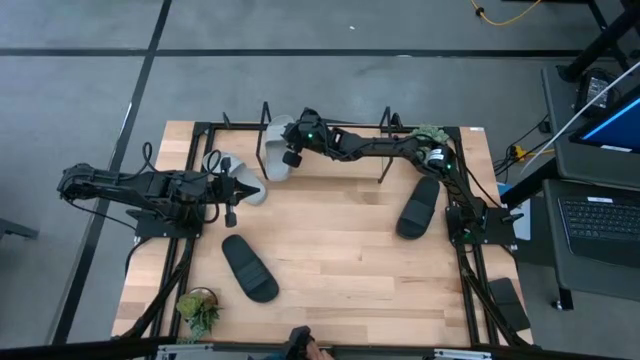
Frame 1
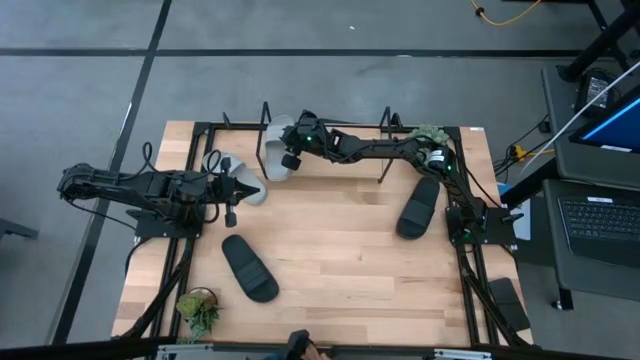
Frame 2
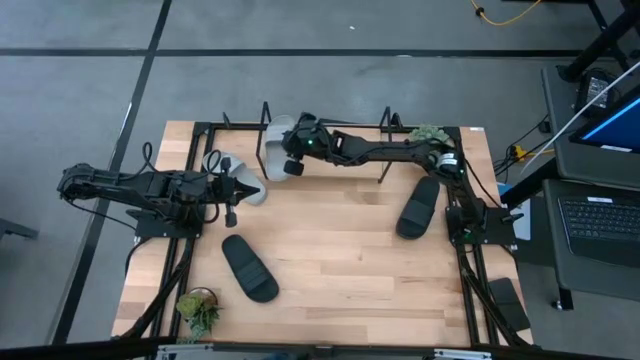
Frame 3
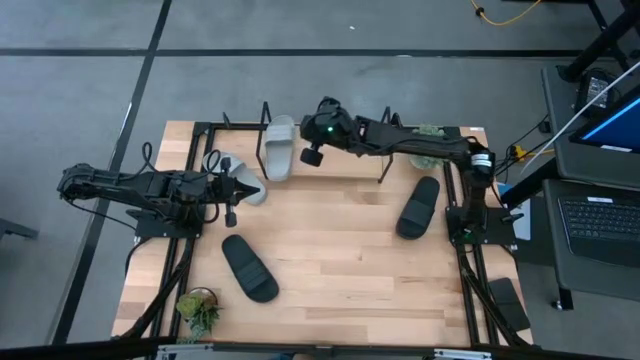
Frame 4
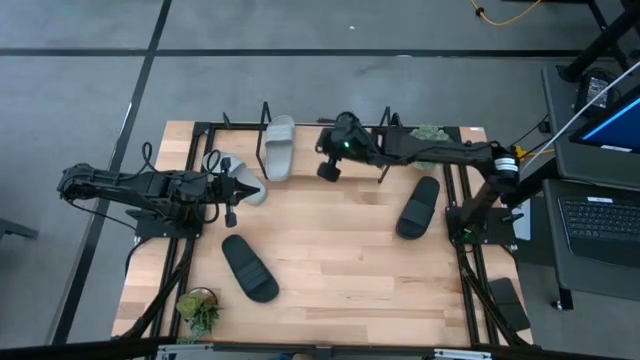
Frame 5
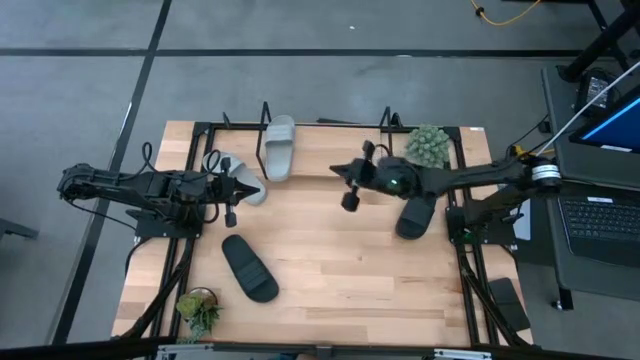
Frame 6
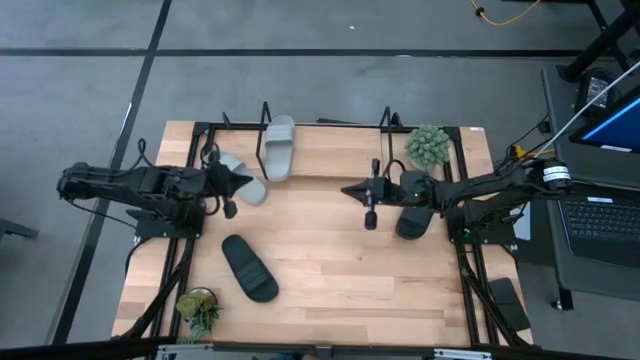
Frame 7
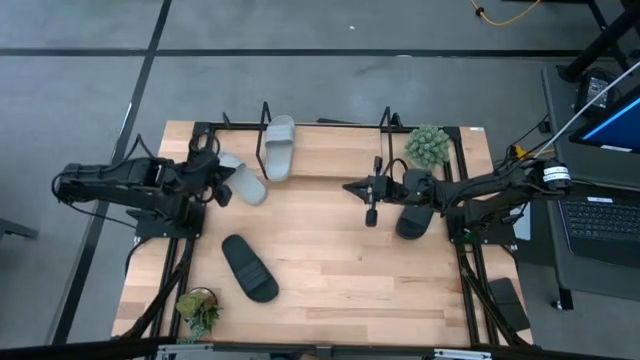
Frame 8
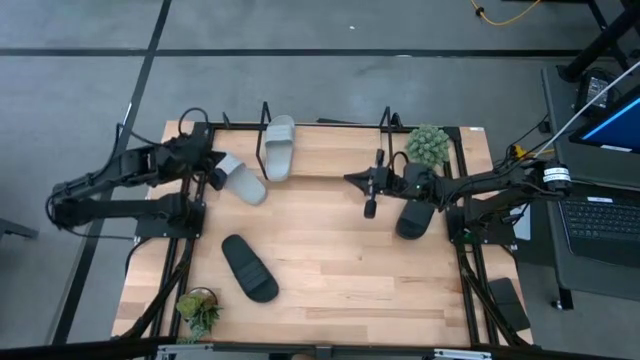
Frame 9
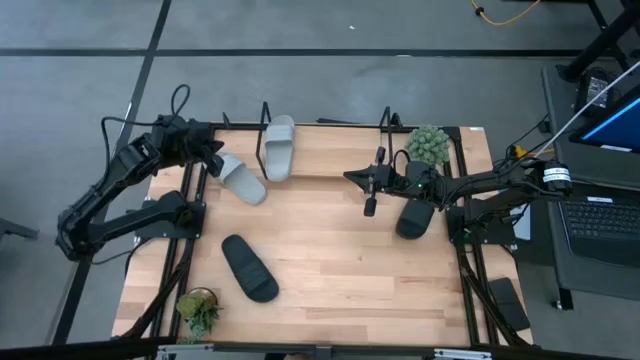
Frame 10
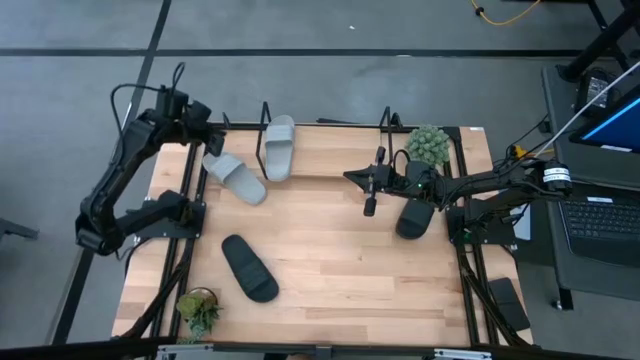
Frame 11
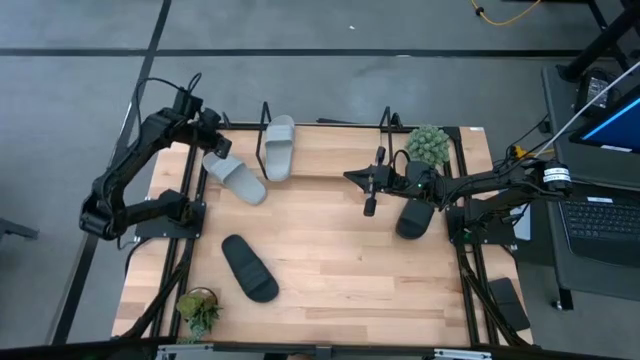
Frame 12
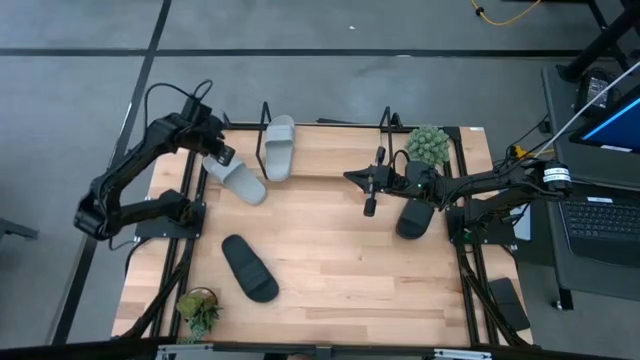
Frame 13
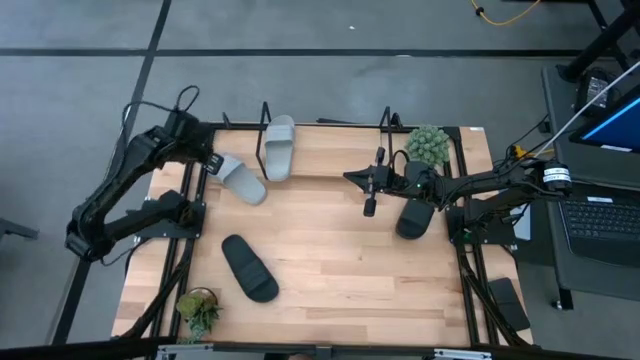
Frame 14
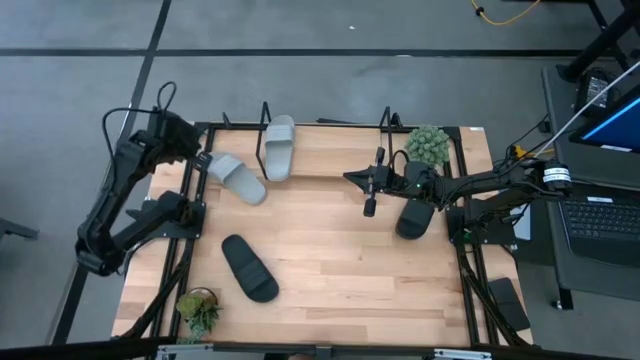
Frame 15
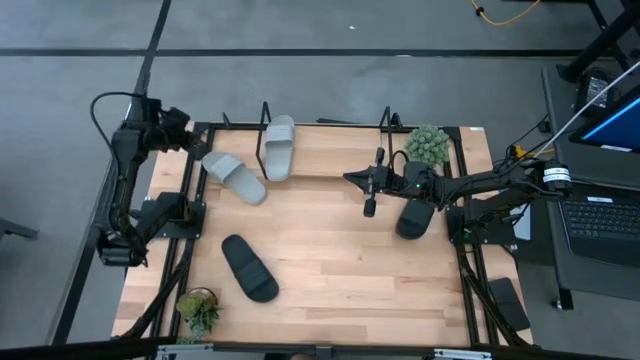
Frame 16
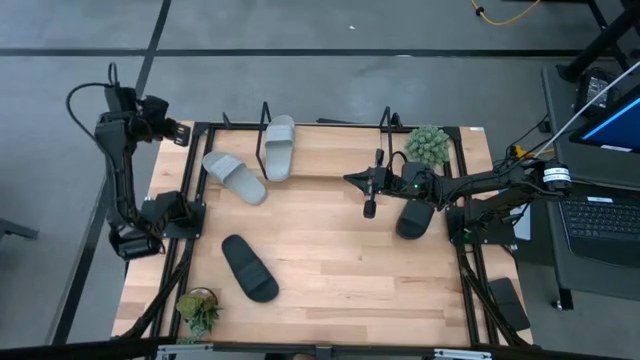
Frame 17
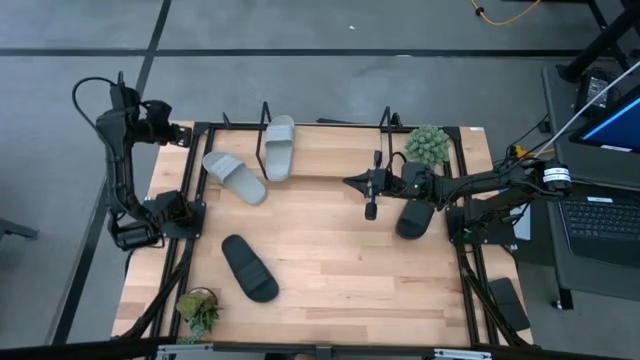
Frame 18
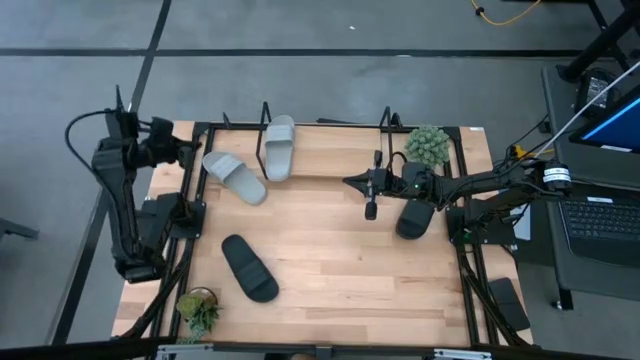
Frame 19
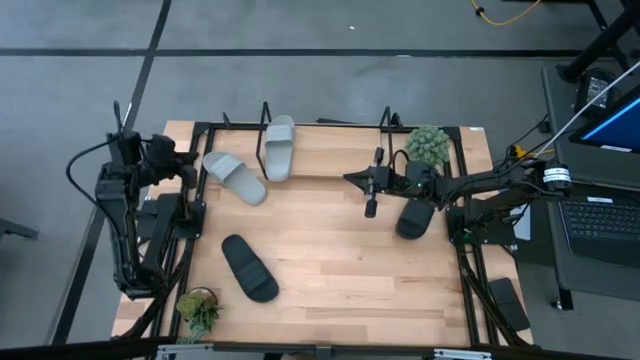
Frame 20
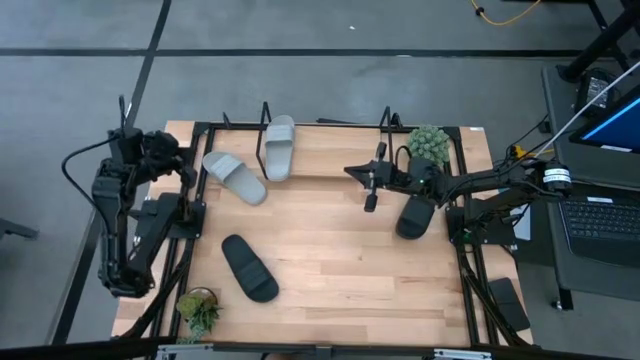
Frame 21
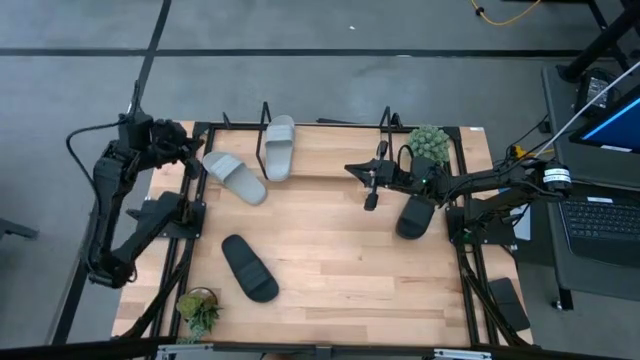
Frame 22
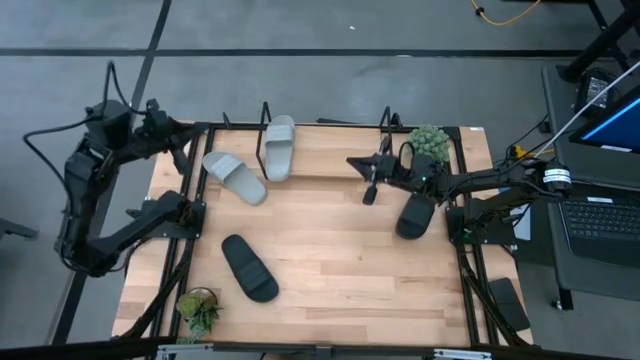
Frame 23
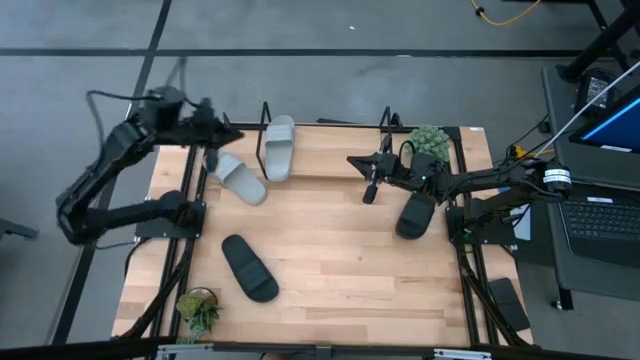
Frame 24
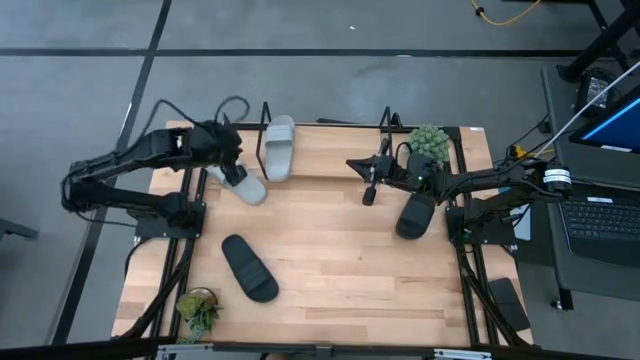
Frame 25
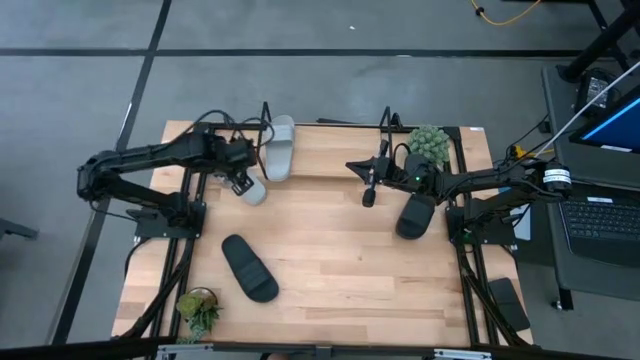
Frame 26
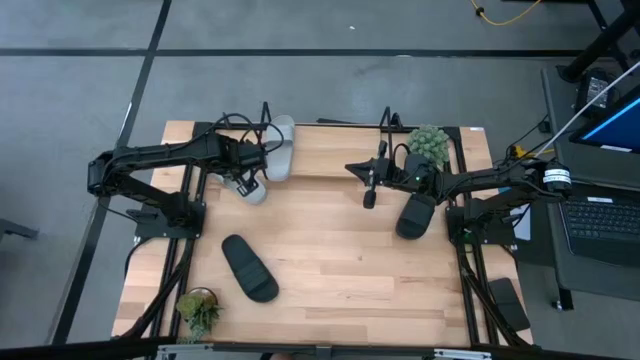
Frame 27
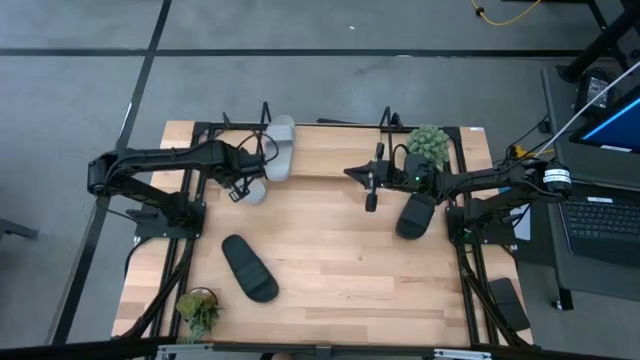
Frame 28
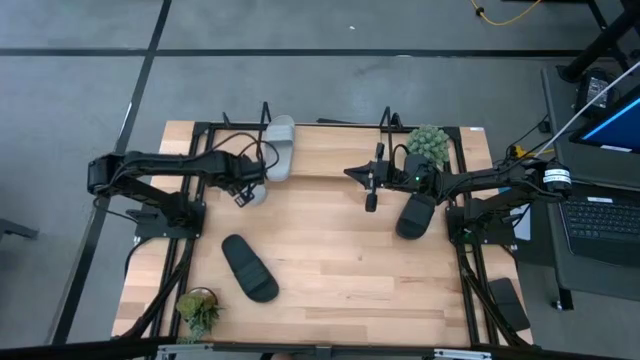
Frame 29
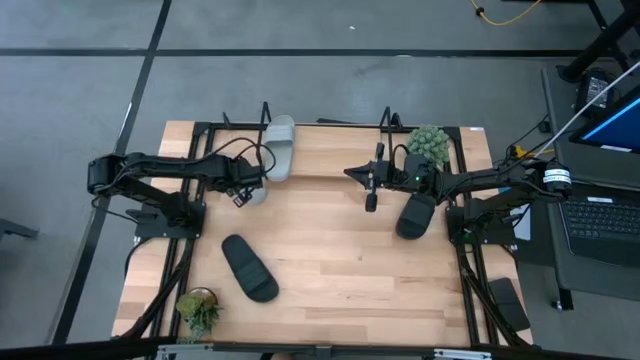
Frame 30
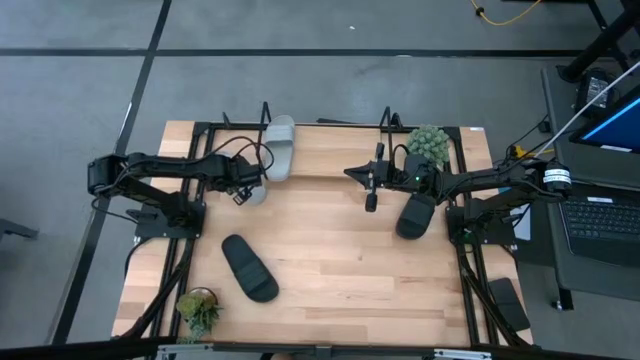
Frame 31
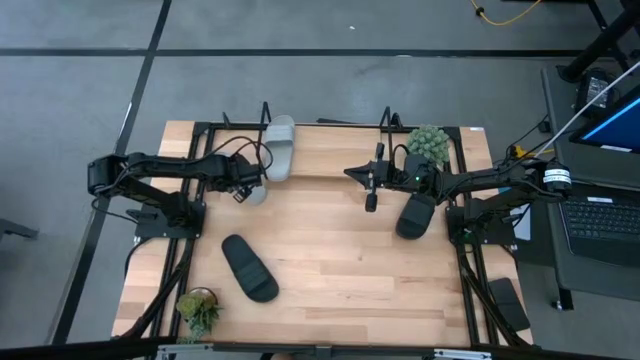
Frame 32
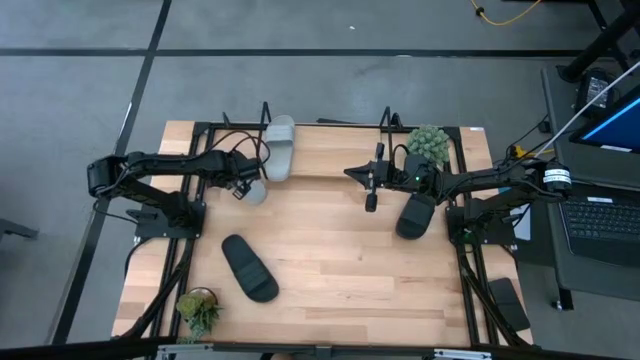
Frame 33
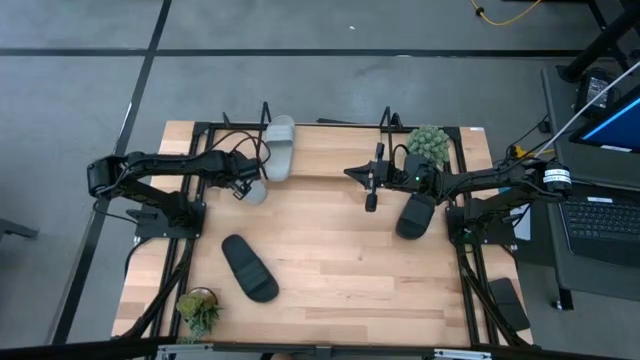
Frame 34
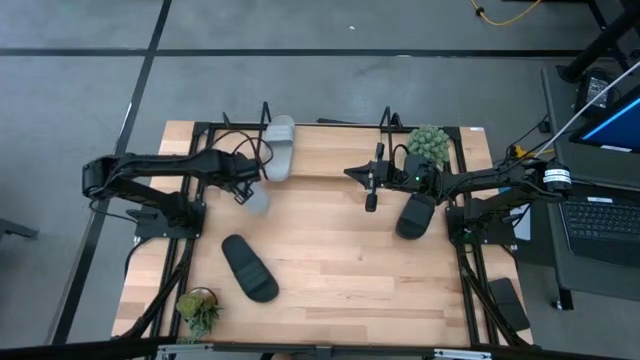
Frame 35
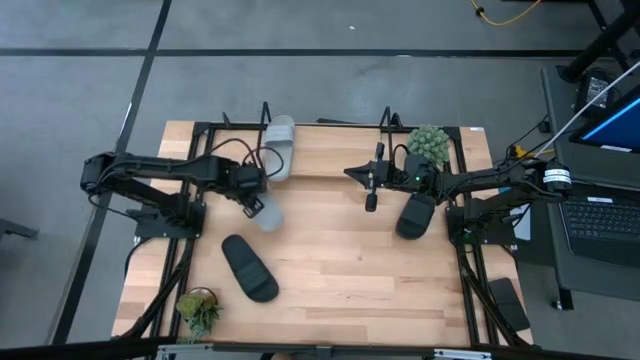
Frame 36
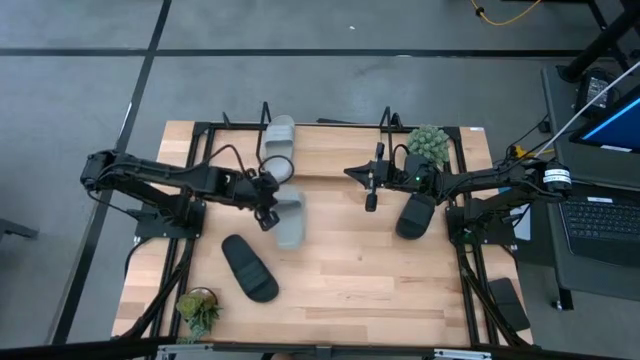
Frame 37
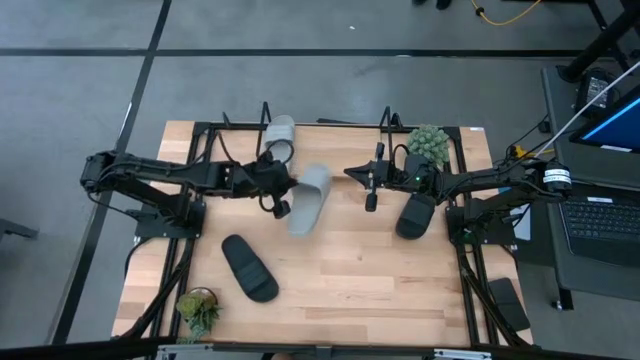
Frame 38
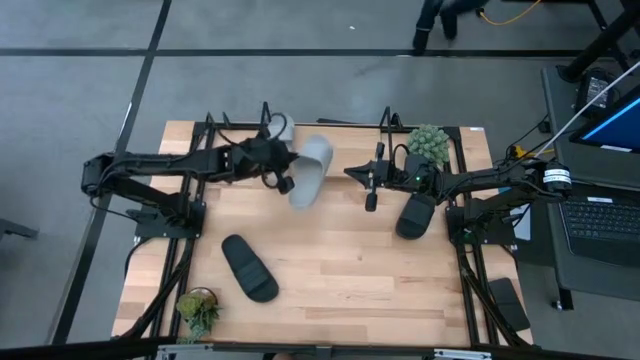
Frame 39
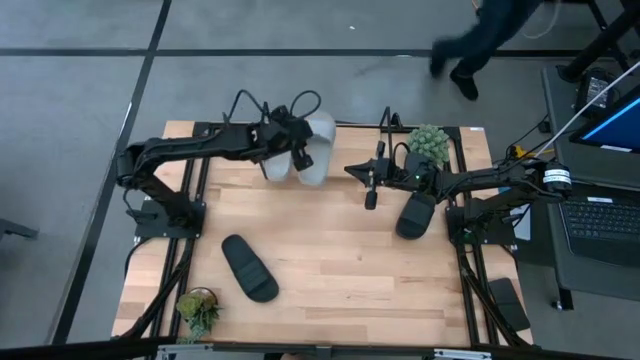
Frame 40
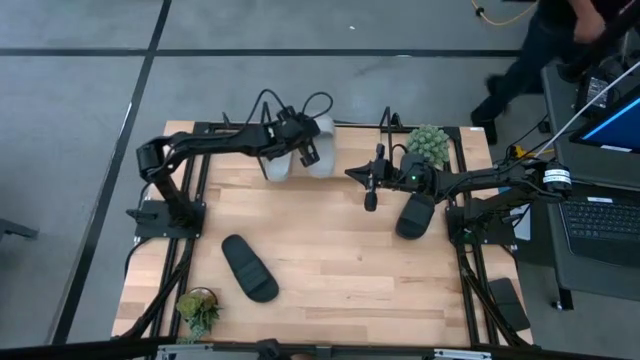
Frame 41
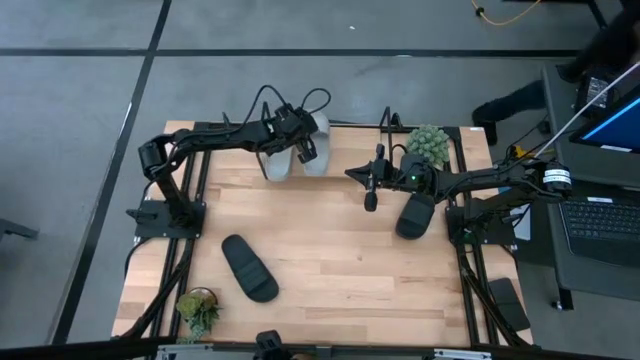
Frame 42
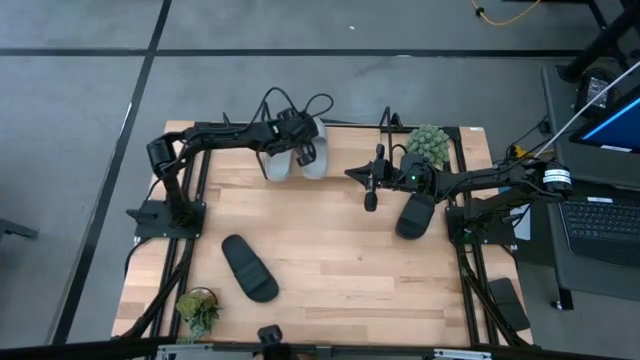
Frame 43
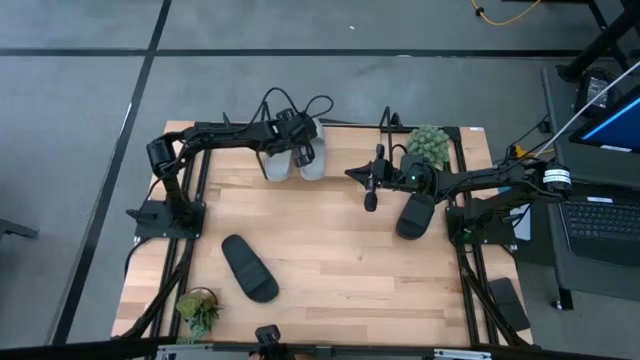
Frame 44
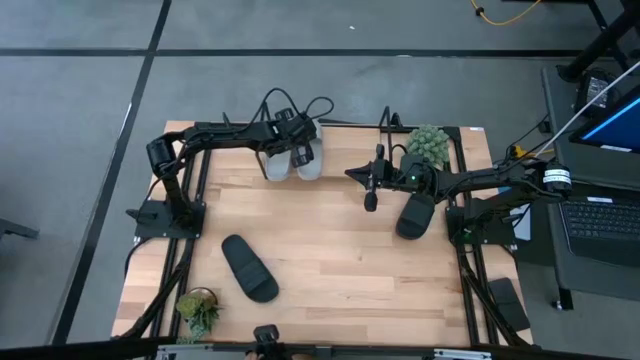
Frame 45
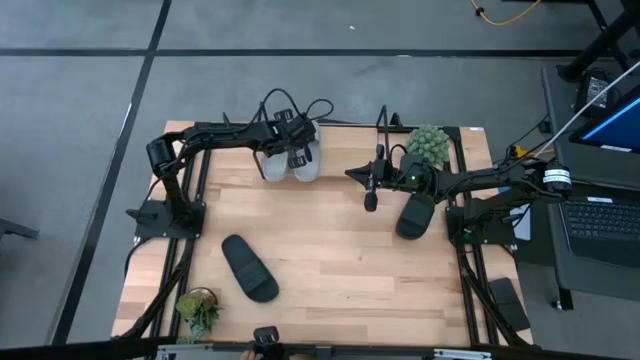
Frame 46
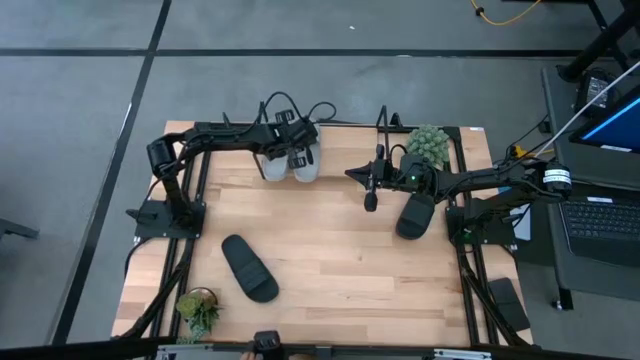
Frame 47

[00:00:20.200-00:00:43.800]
Task: Pick and place slides into the shelf
Put the gray slide on the shelf
